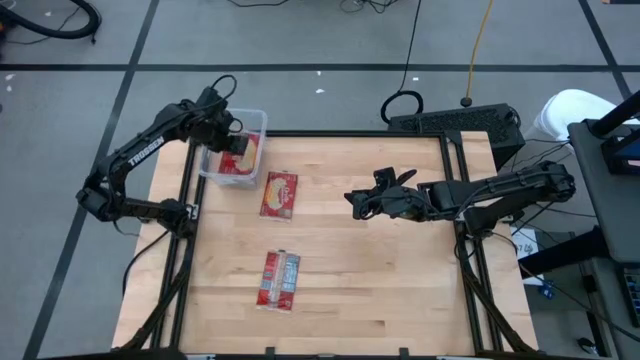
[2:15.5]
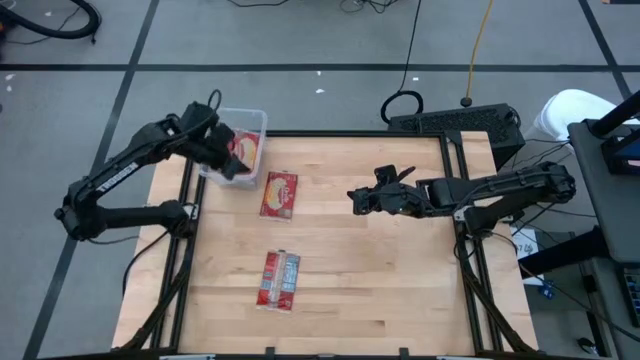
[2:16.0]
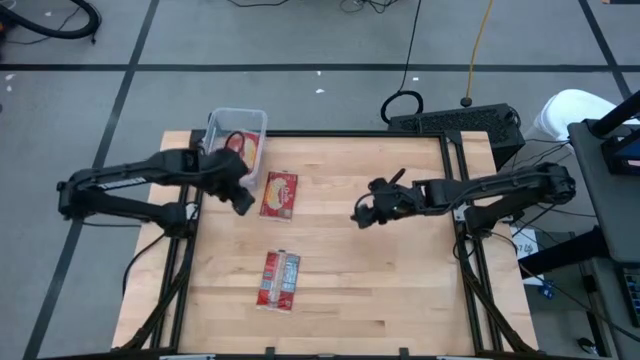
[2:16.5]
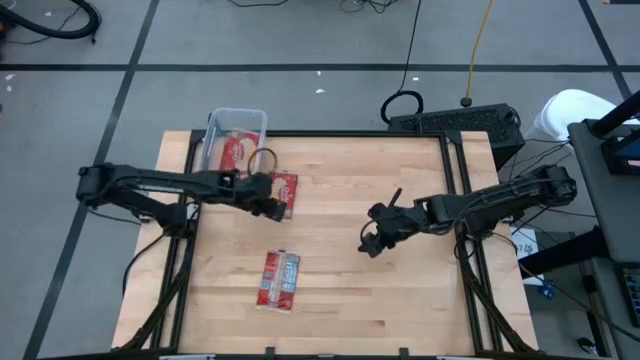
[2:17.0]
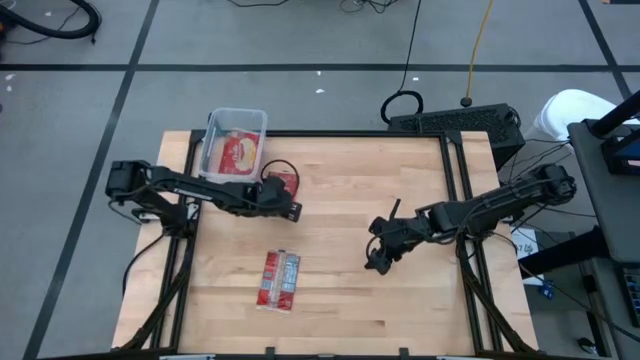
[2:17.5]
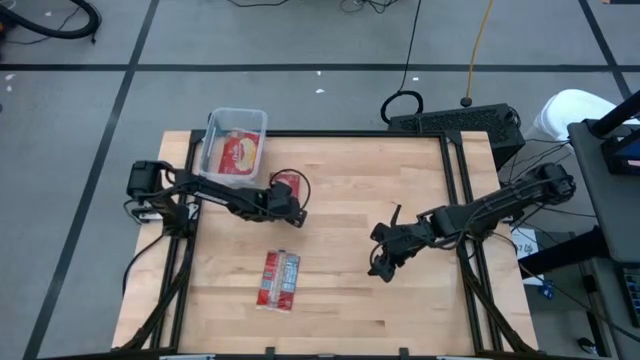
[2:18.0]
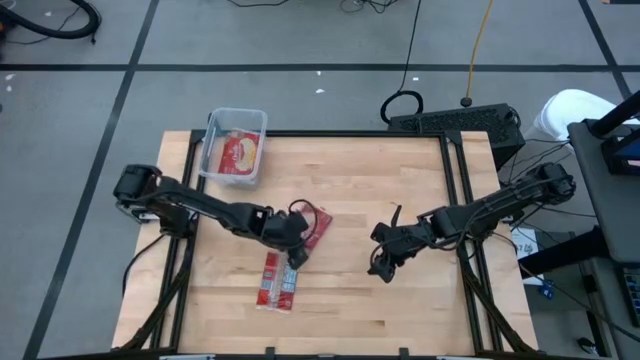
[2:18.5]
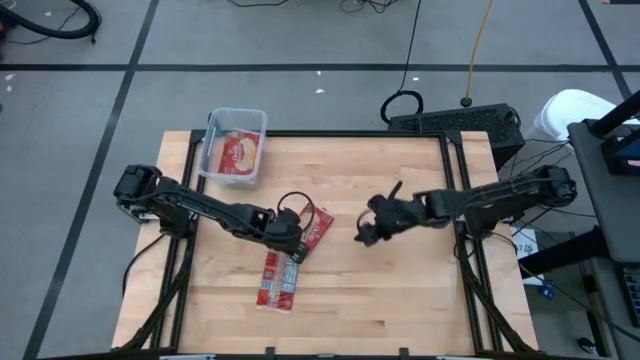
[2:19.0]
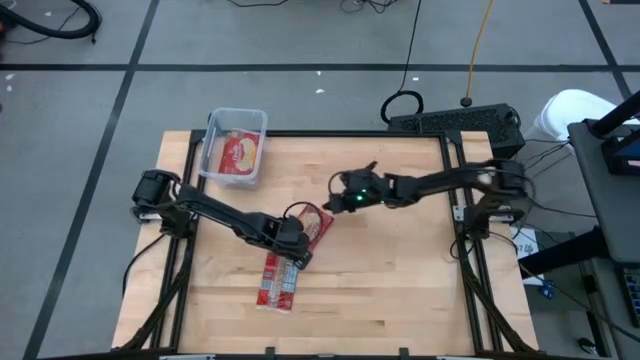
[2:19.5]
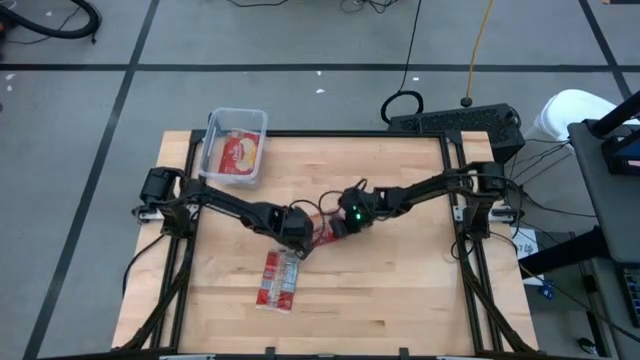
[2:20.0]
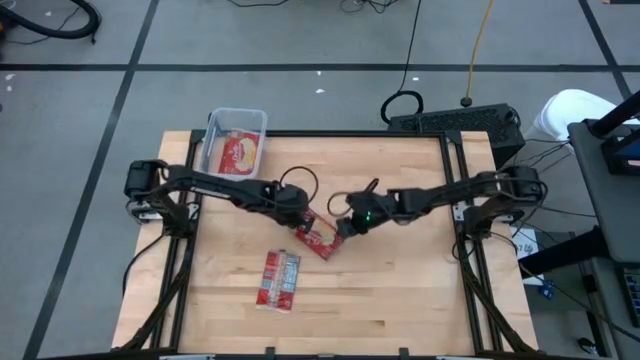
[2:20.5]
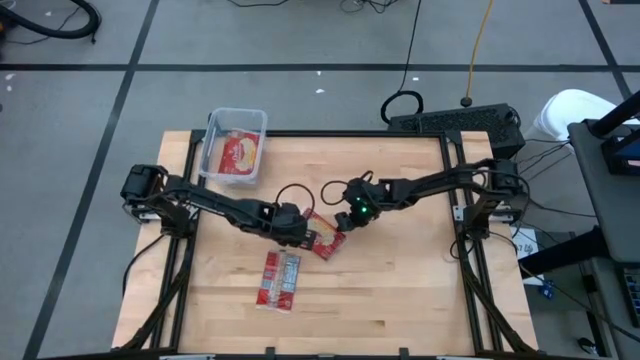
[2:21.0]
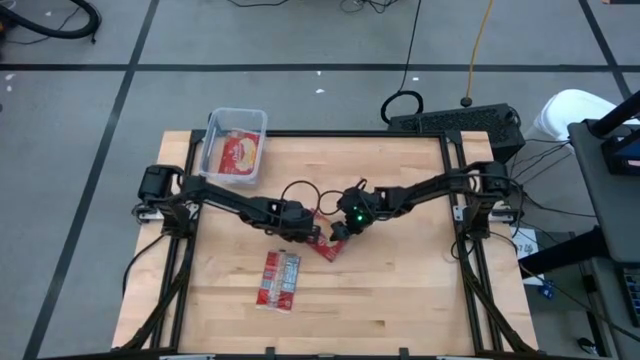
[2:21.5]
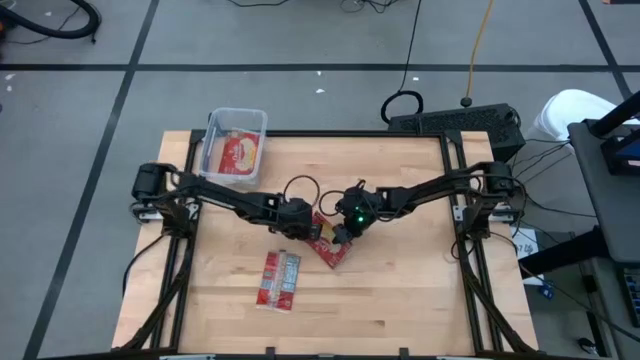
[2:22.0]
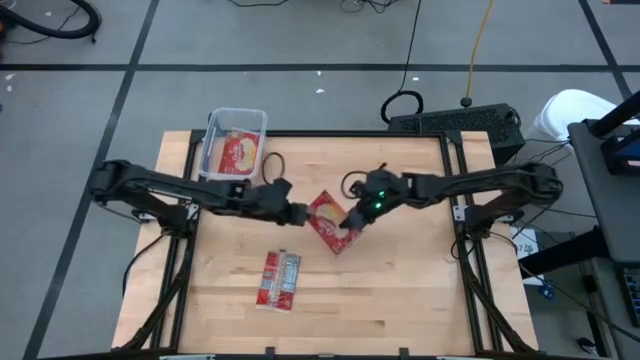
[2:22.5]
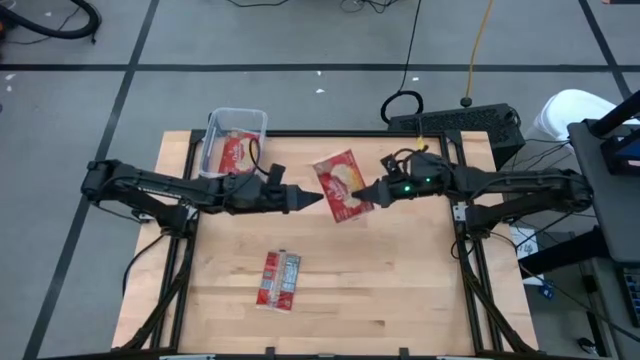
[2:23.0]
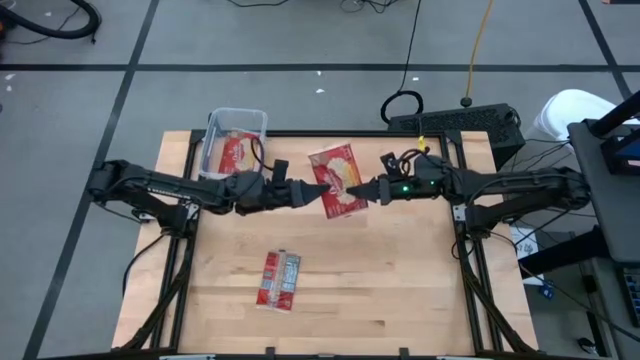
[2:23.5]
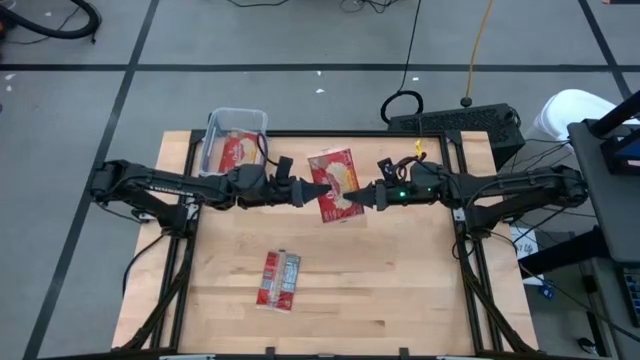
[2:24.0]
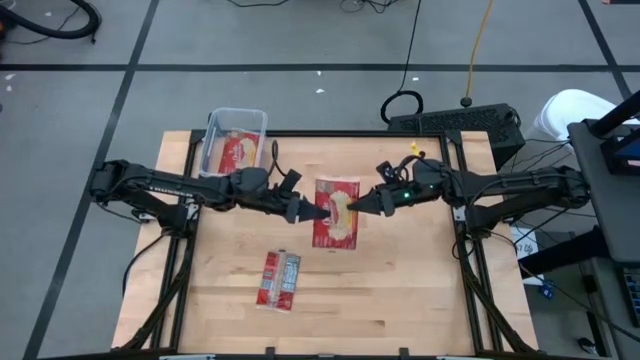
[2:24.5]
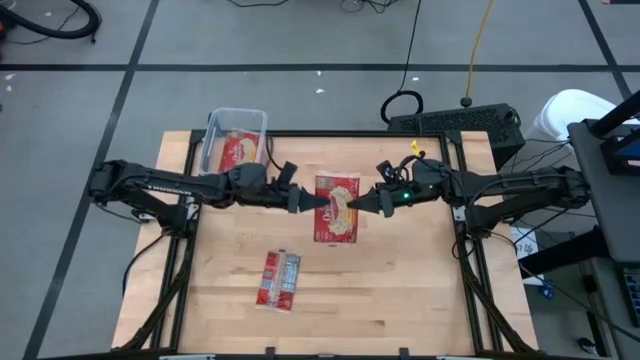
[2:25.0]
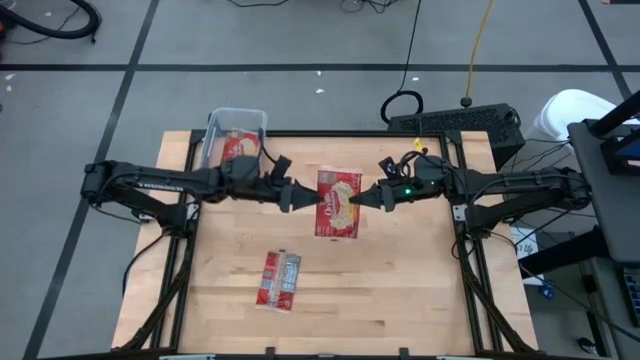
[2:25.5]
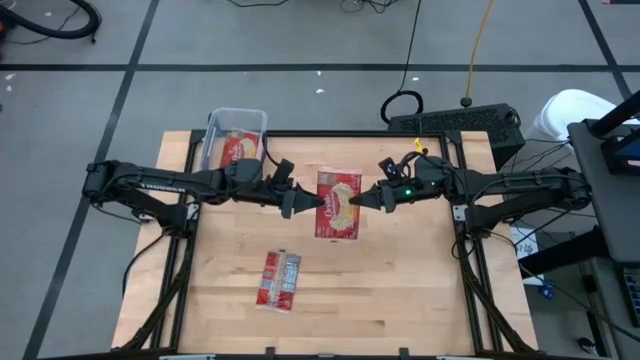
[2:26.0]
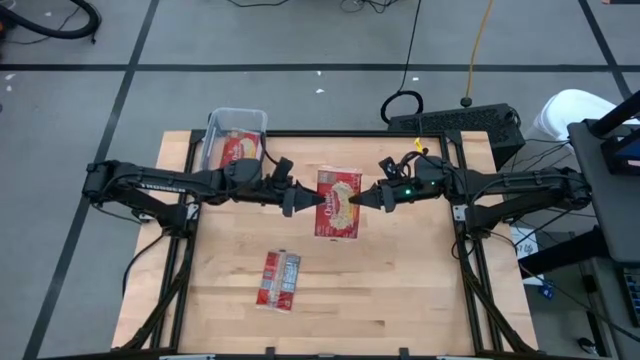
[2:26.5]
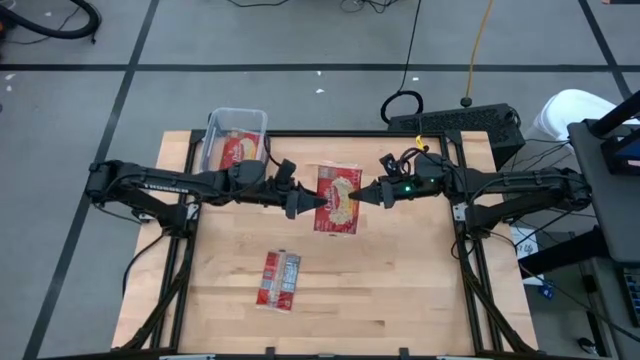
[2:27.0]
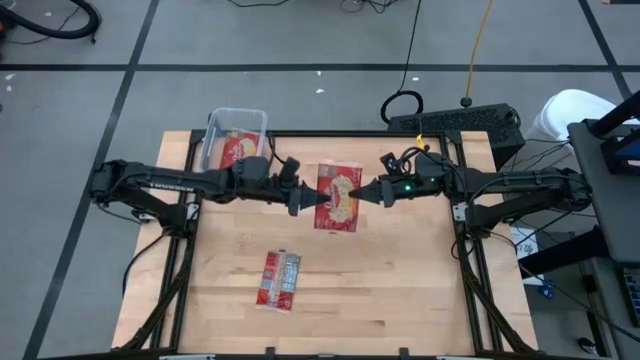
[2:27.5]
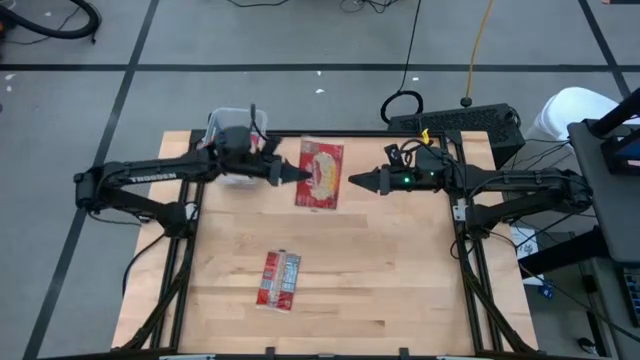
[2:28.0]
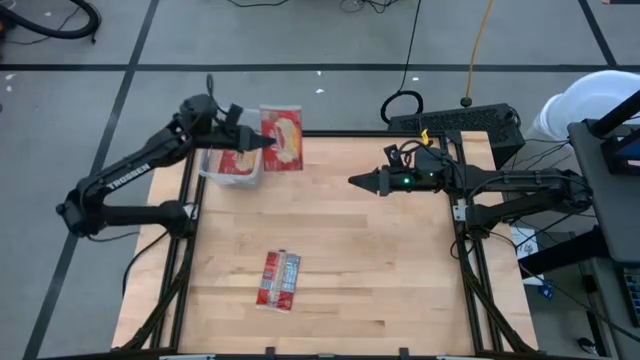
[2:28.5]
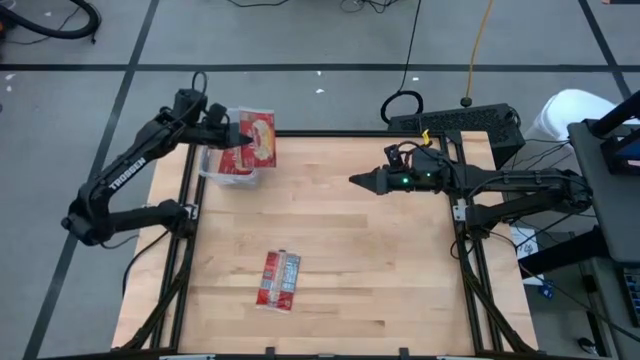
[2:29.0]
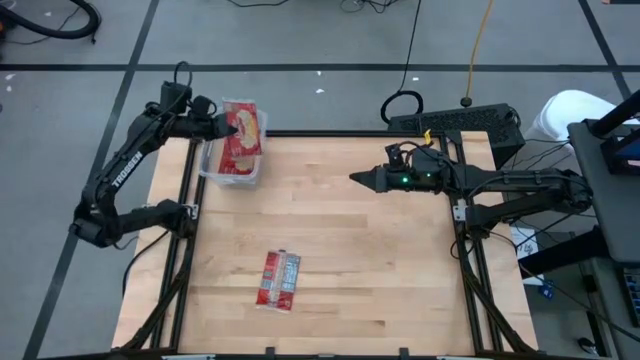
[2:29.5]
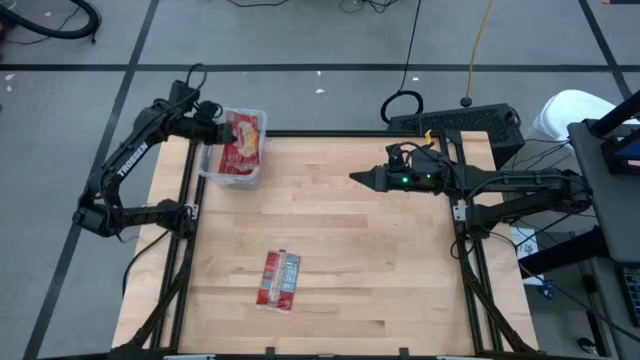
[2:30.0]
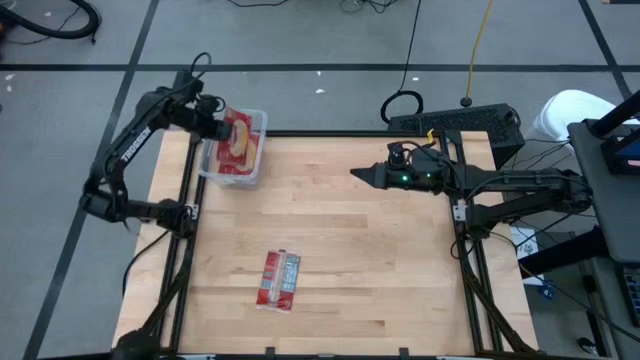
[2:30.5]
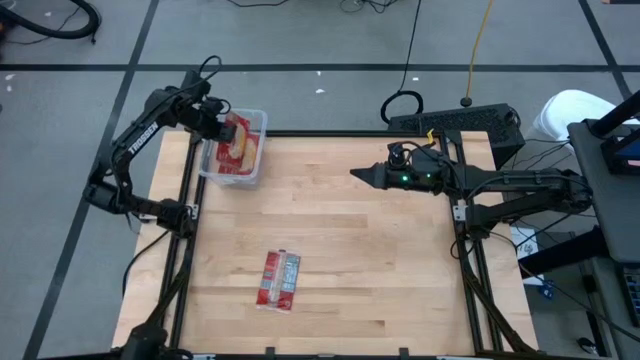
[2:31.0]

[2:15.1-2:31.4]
Task: Sort popcorn bags into baskets
Put the red popcorn bag into the transparent container

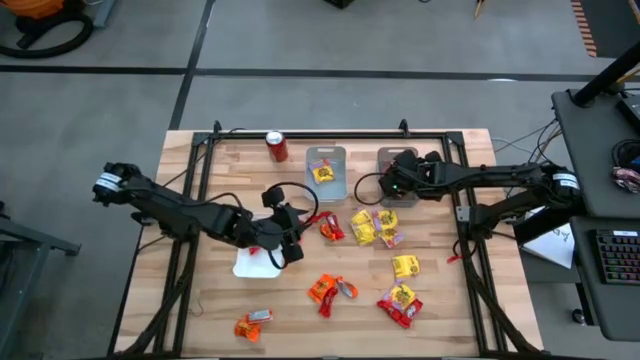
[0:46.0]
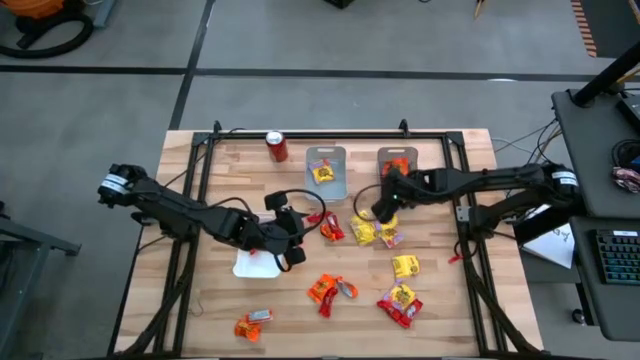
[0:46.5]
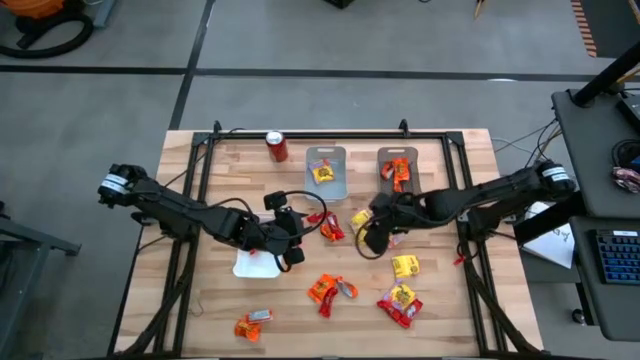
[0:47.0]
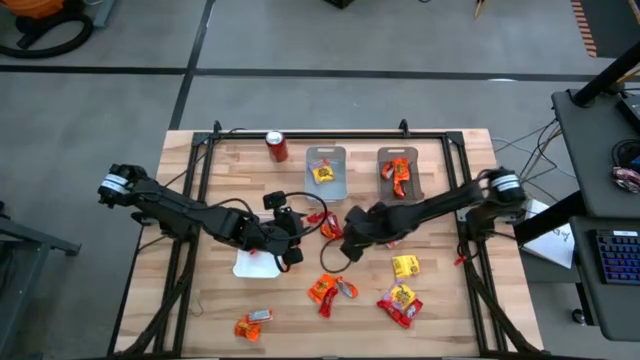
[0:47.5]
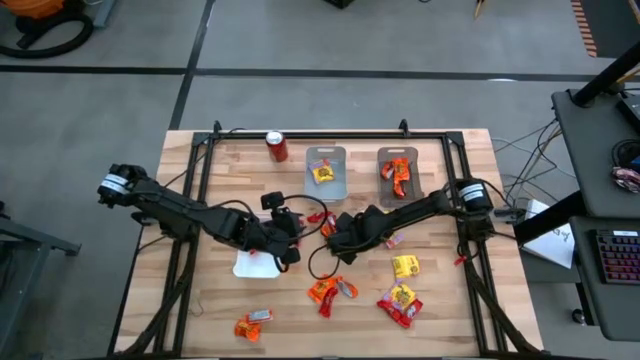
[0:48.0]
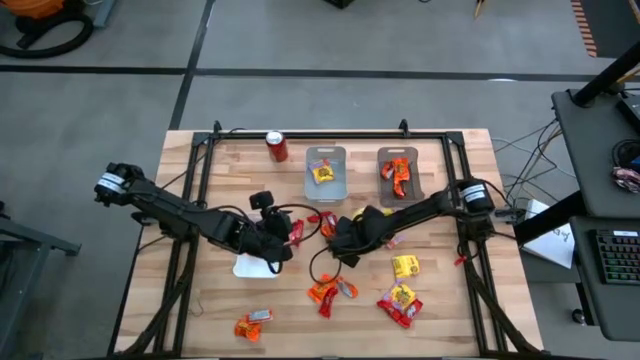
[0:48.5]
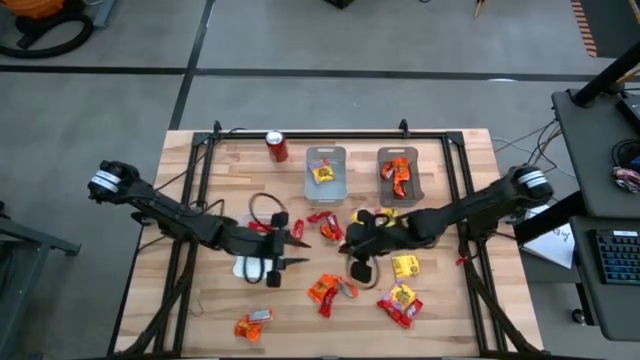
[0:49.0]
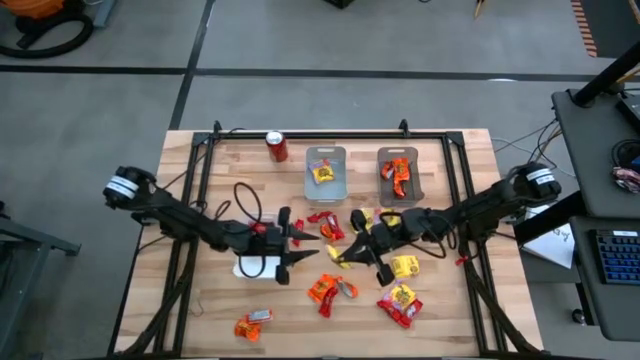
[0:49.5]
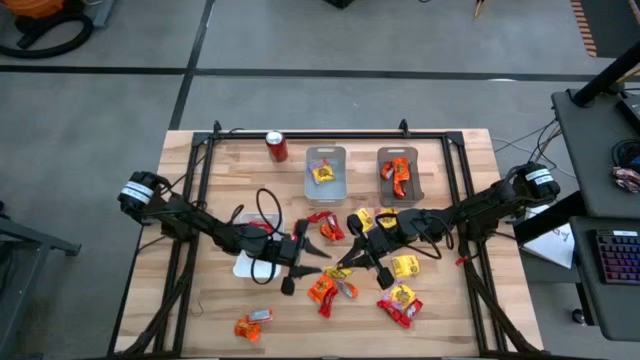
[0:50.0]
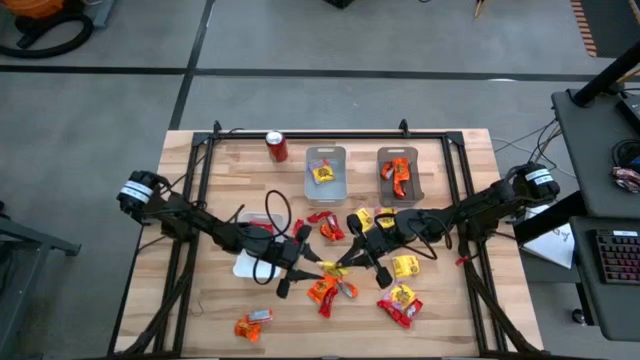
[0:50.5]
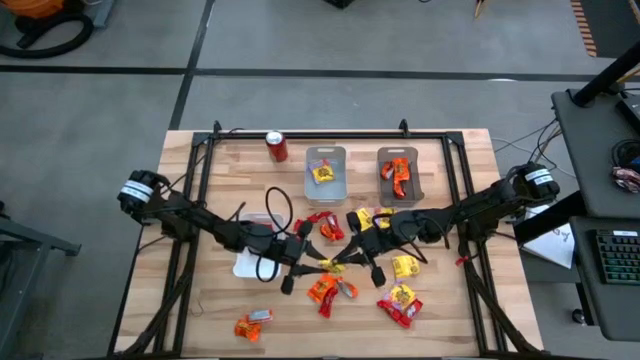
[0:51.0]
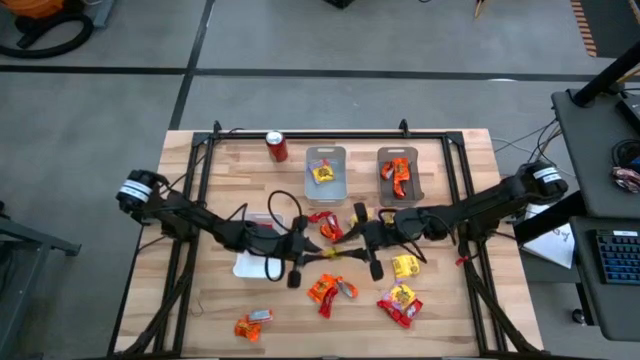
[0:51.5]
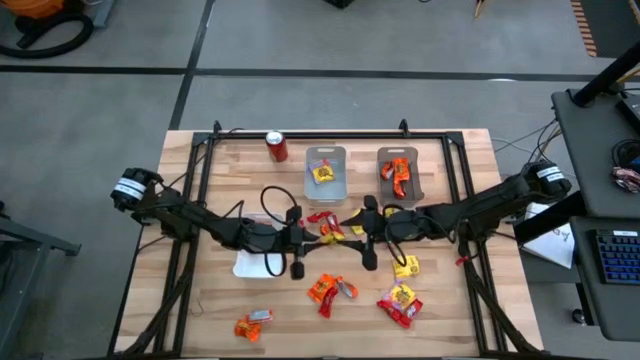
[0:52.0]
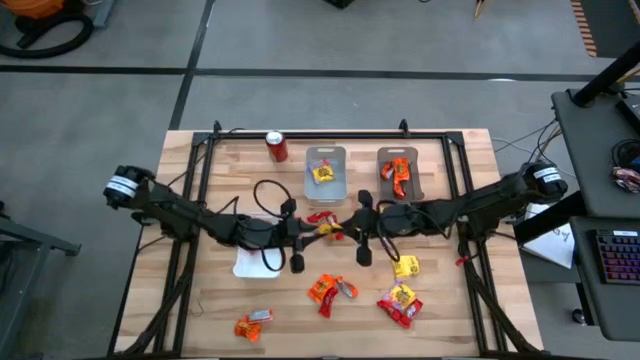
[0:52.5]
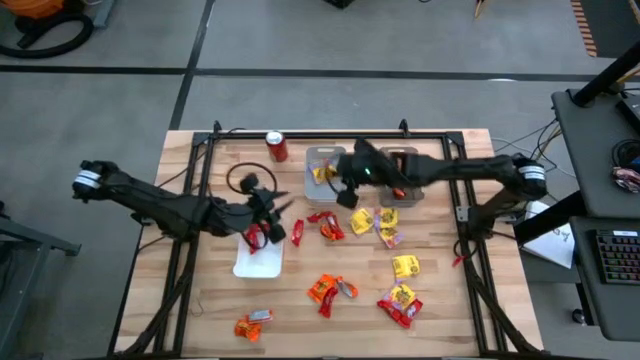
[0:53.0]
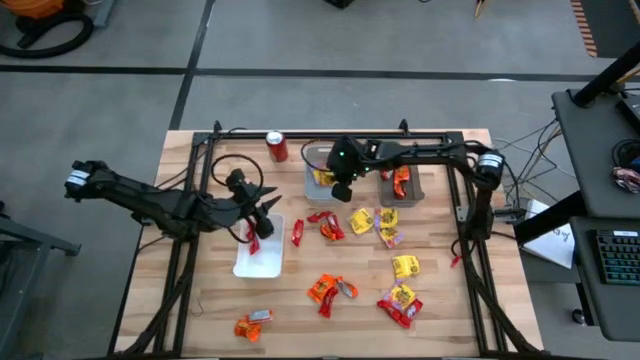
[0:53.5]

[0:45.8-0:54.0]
Task: Sort candy
Put the yellow candy into the gray bin
